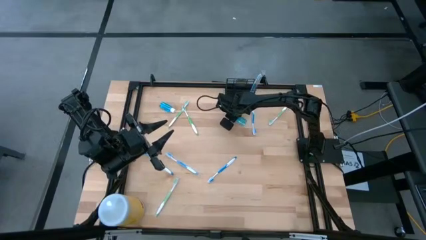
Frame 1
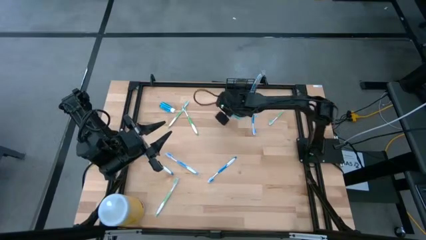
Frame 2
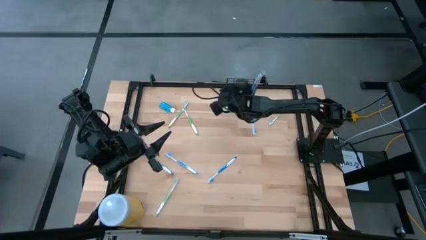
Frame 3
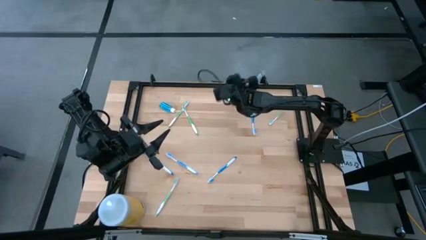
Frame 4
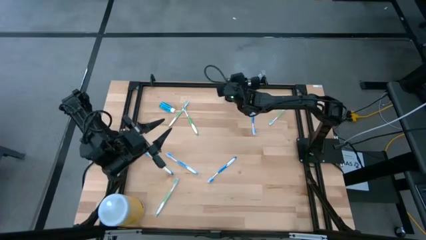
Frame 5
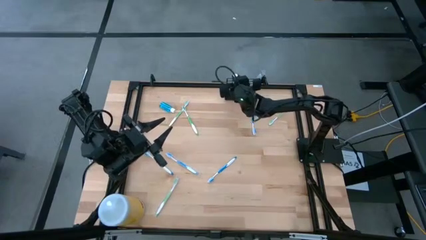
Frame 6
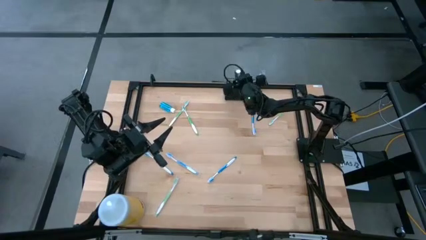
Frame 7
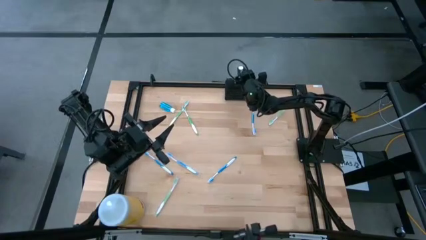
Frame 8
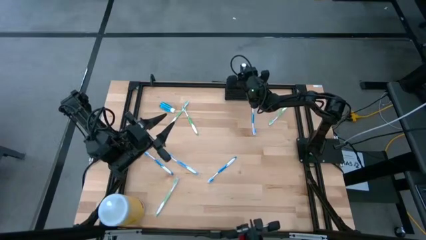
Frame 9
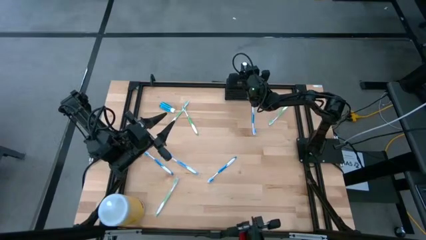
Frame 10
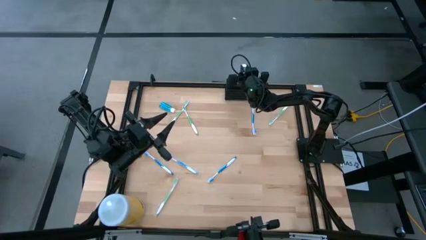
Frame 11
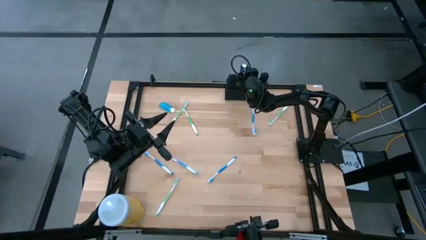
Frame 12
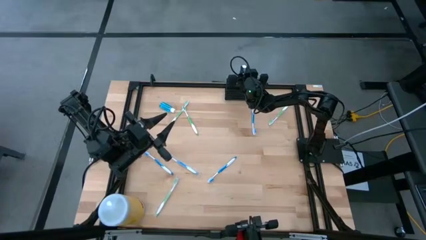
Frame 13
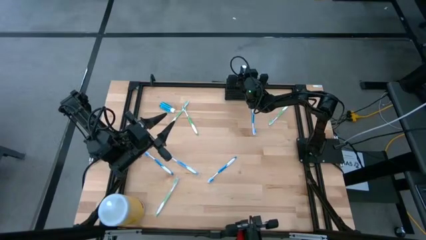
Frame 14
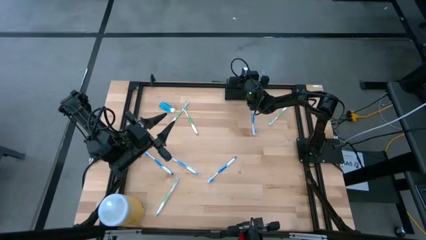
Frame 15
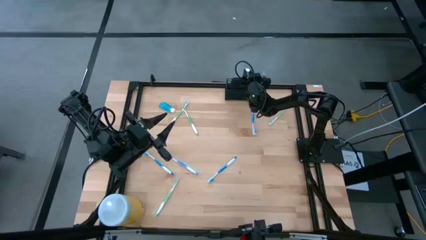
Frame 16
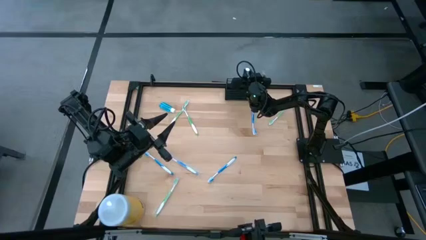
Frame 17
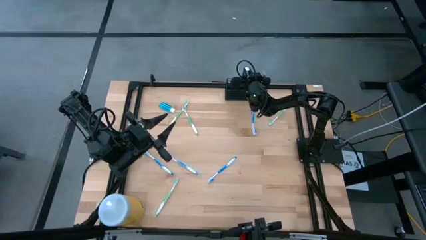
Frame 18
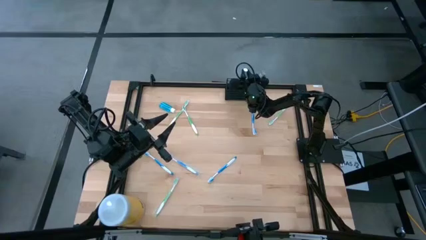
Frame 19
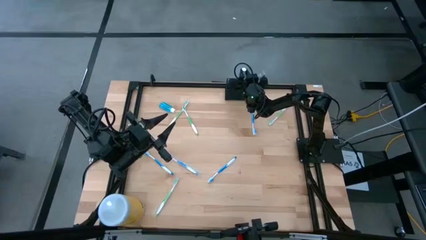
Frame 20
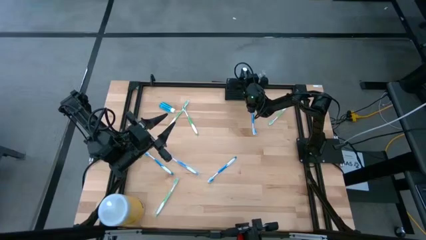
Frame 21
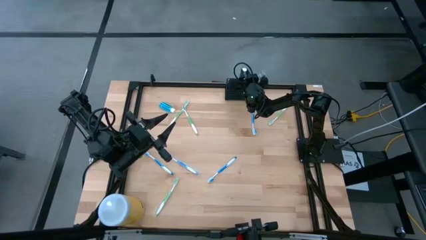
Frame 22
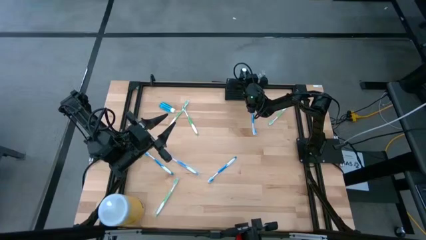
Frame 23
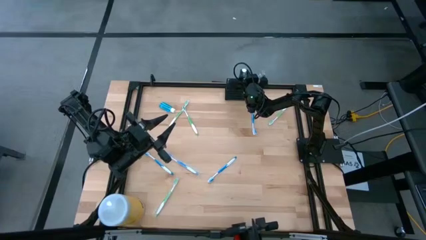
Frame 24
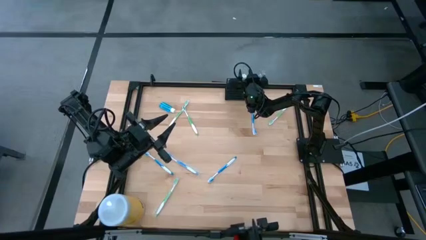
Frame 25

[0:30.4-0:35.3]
Task: Pick & Place toothbrushing station
Put the blue mouthwash into the black organizer

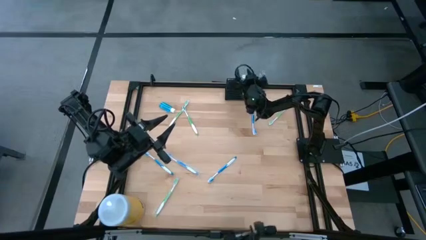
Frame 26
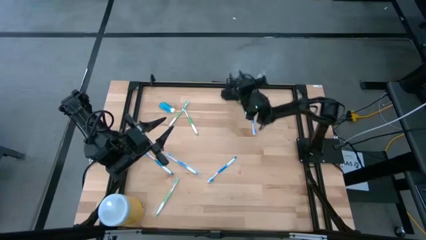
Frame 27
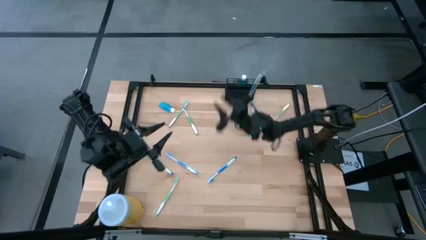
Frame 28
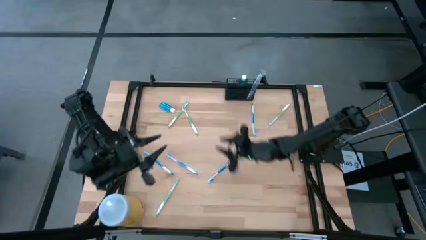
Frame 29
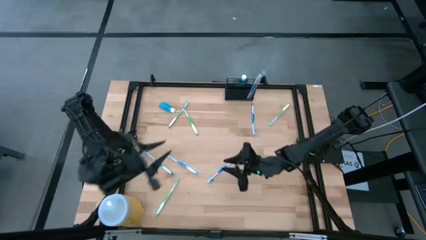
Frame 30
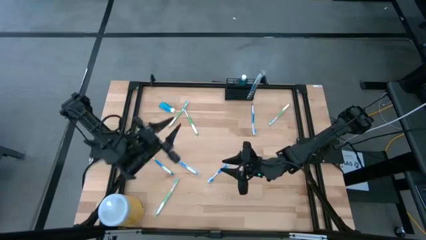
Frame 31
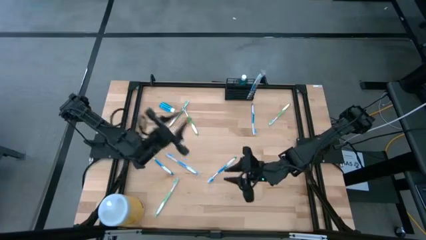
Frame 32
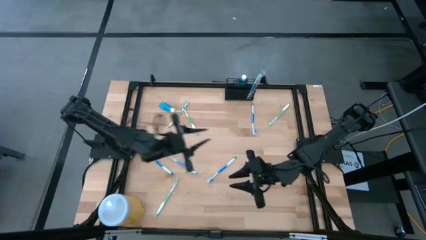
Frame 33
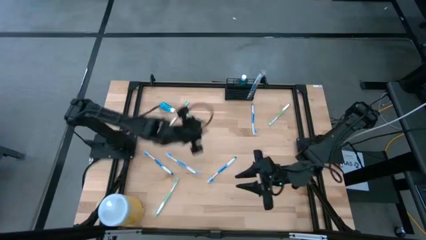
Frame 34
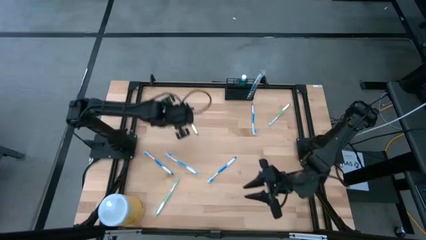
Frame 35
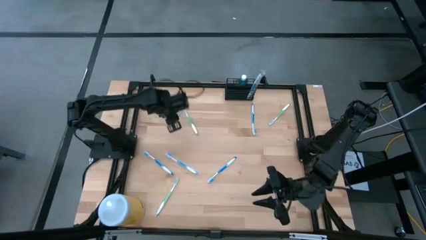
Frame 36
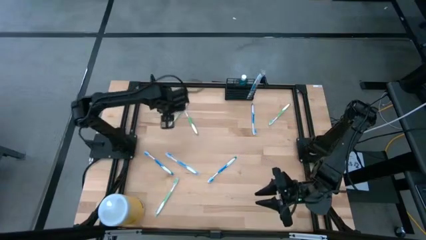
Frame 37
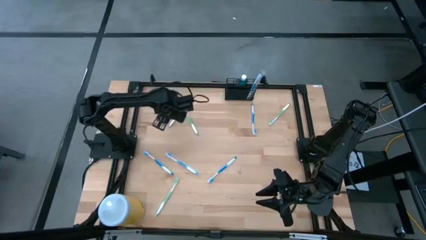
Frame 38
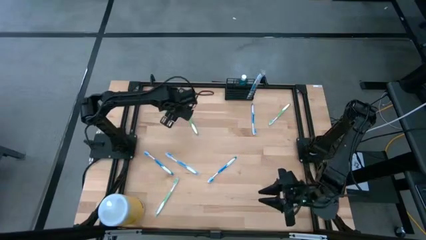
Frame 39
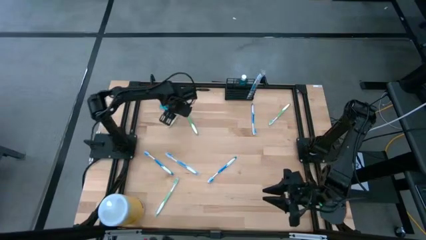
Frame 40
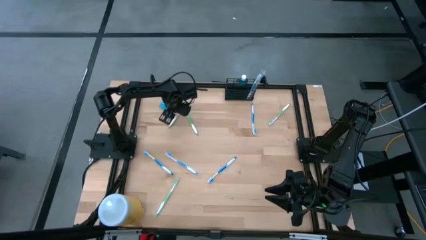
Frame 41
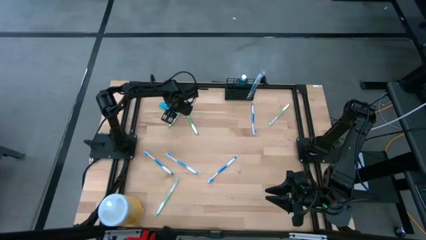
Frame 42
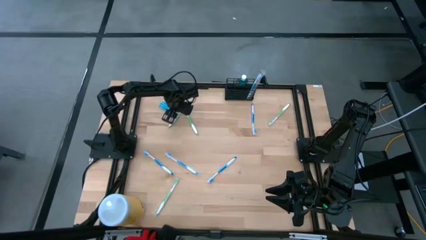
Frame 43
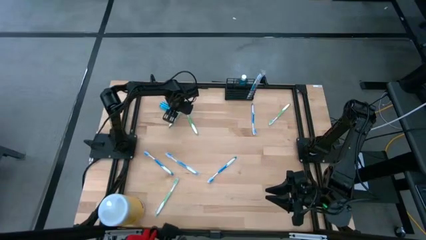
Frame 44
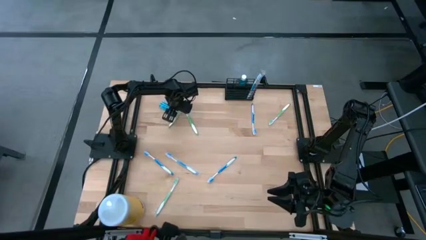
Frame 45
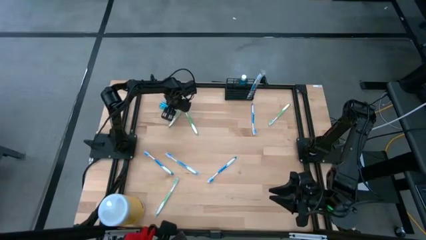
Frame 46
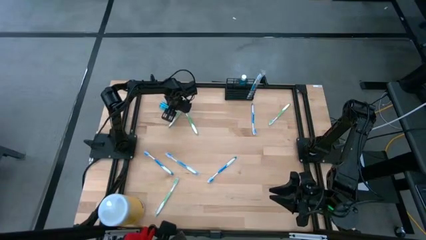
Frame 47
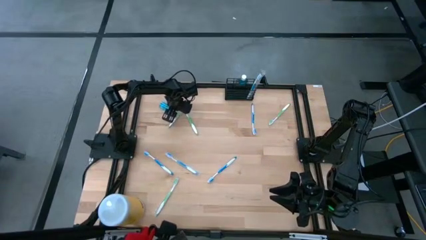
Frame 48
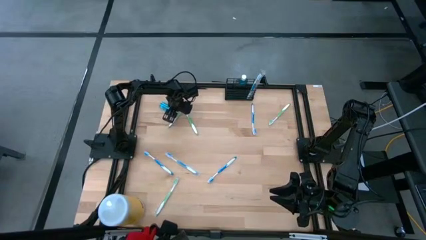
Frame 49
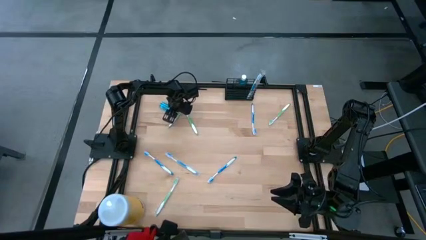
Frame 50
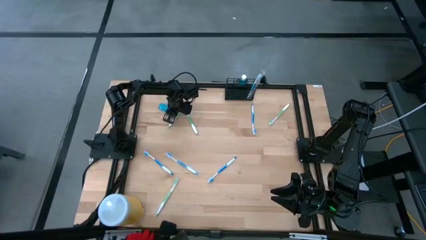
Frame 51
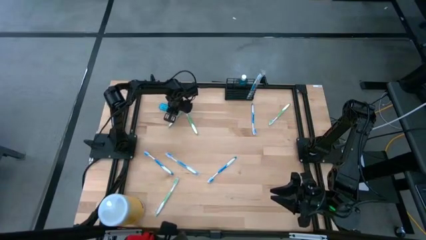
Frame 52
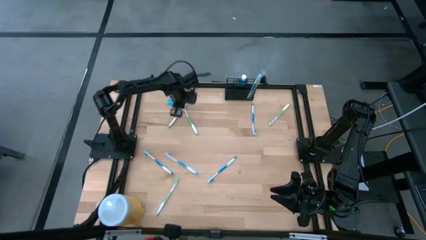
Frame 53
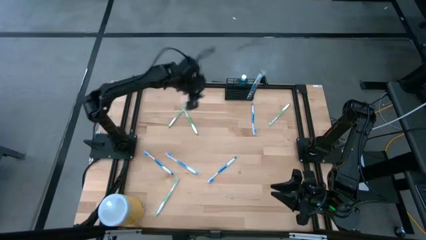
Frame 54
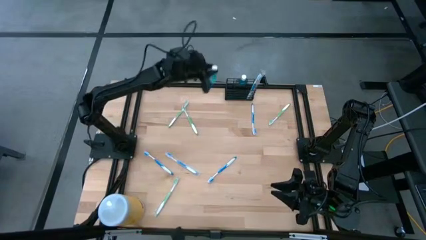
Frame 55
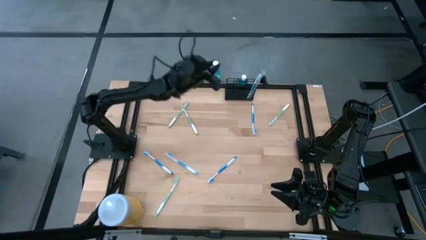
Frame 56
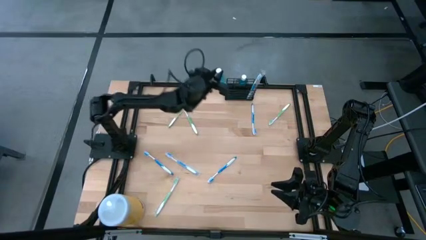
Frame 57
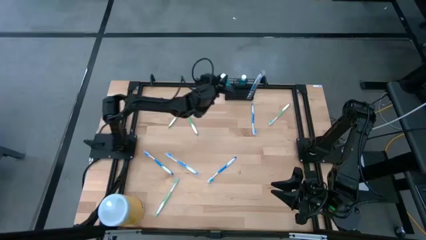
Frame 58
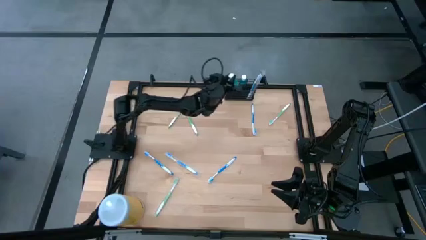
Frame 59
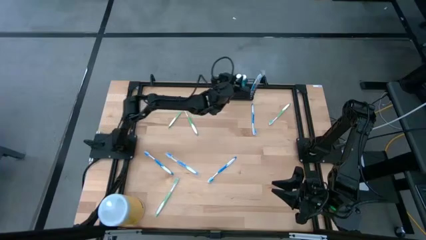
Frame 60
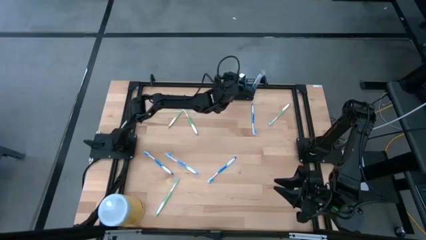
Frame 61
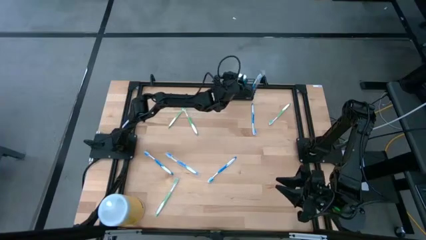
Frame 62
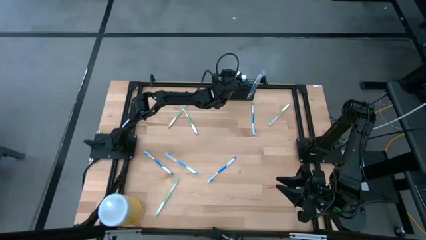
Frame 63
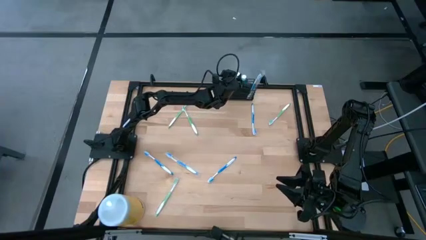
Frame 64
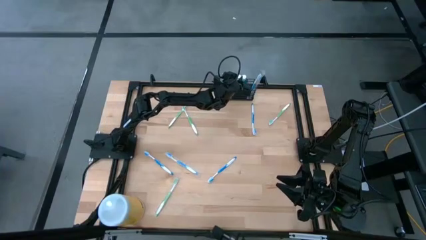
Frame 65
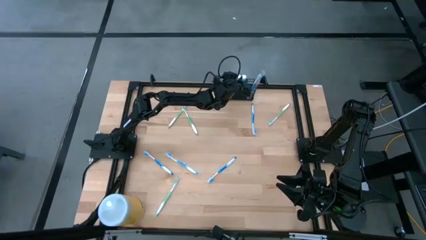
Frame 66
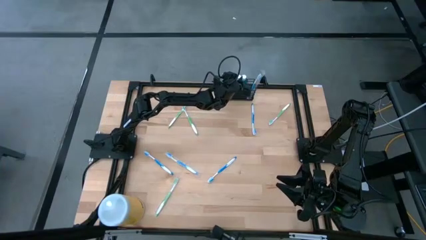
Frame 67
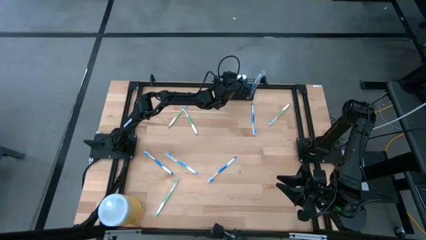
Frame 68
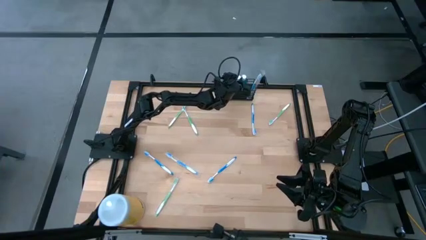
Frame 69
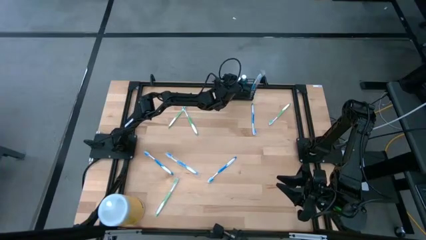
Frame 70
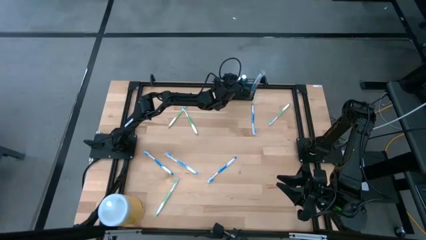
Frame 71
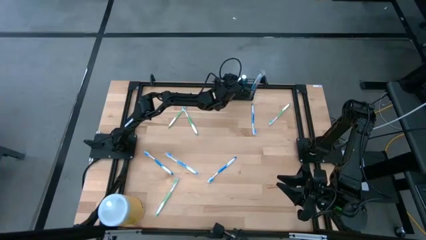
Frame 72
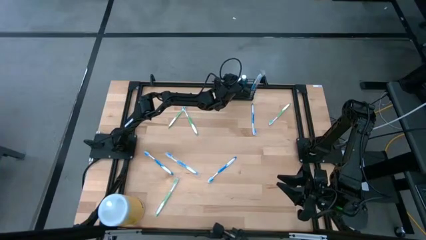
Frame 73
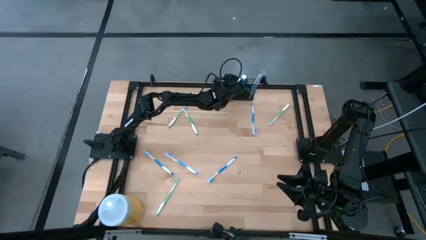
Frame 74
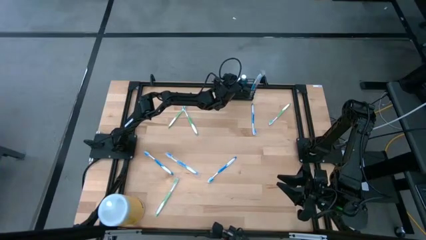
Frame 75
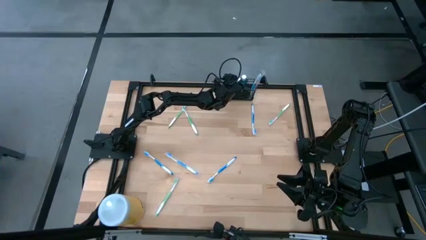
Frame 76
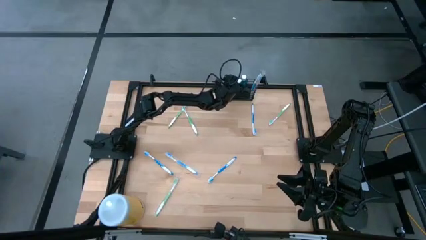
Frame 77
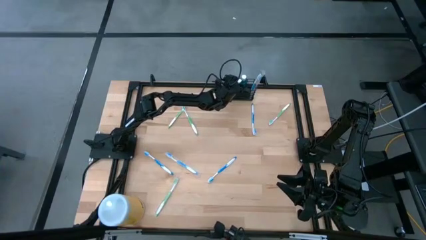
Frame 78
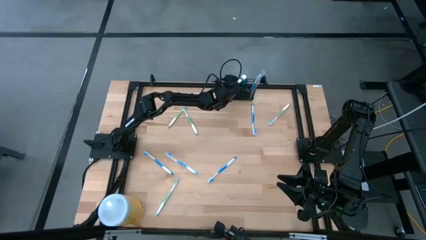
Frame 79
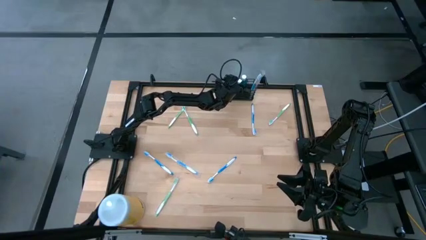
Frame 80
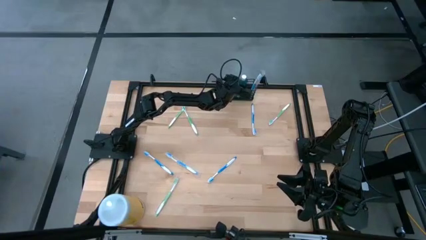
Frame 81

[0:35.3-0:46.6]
Put the blue mouthwash into the black organizer
